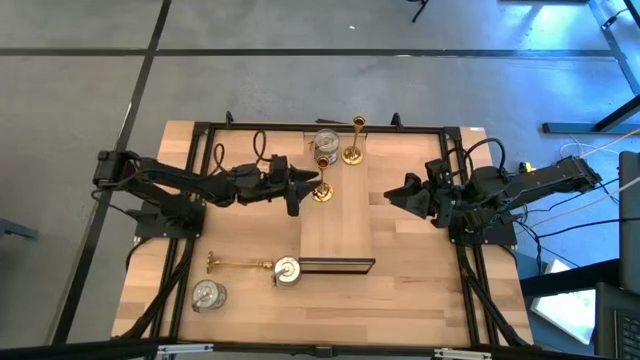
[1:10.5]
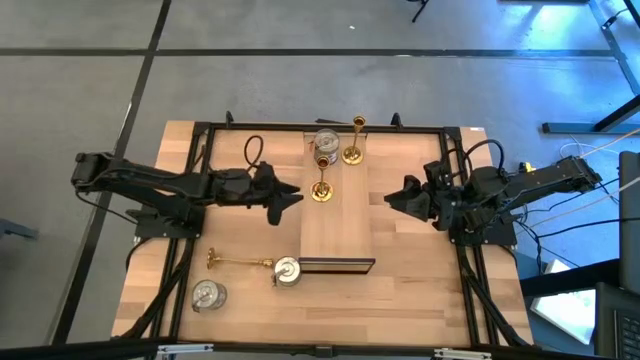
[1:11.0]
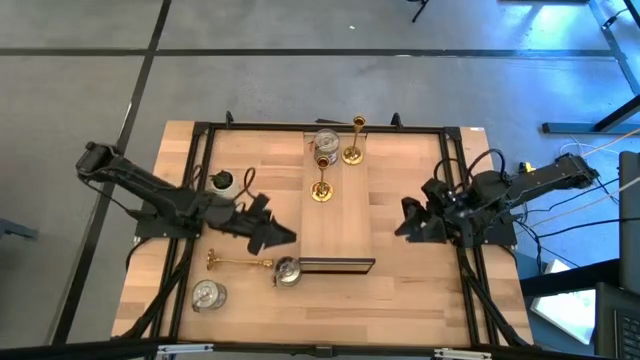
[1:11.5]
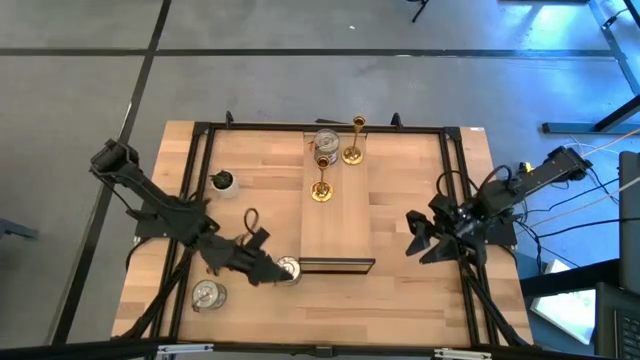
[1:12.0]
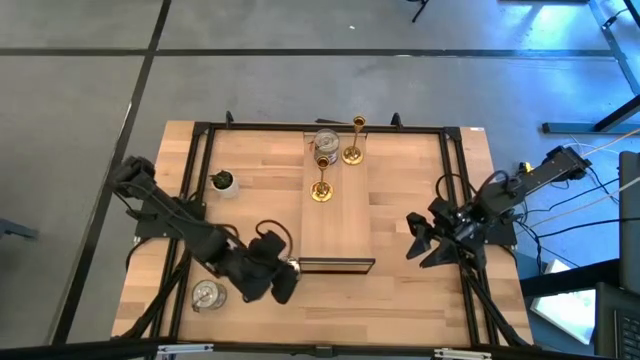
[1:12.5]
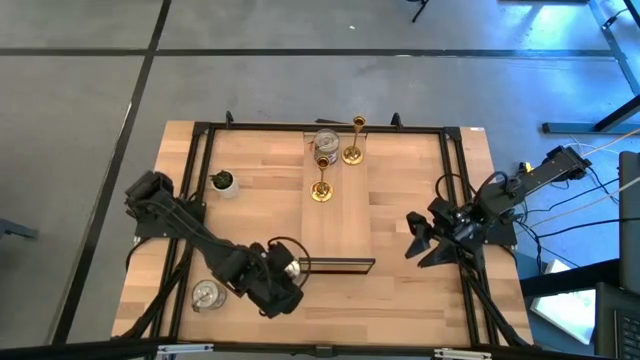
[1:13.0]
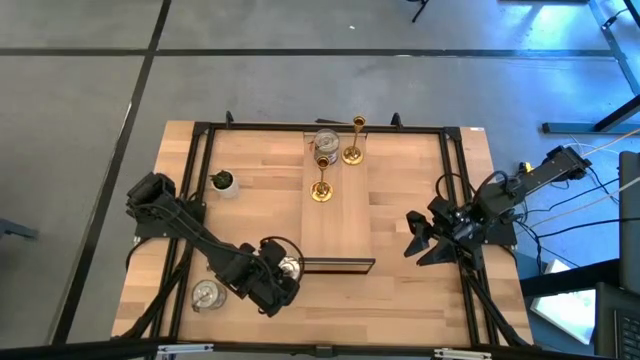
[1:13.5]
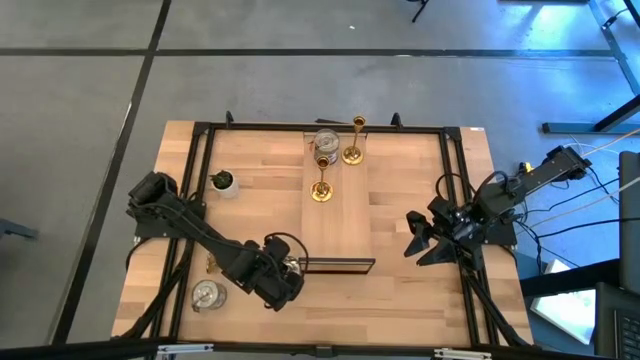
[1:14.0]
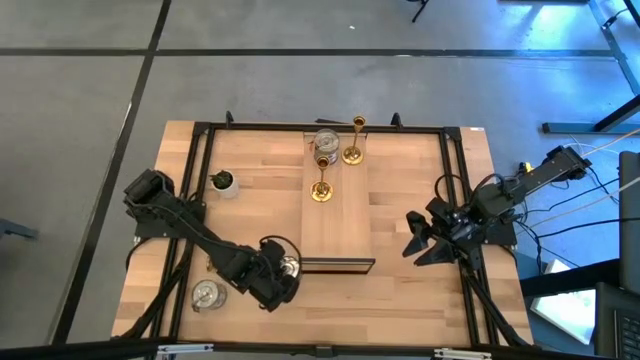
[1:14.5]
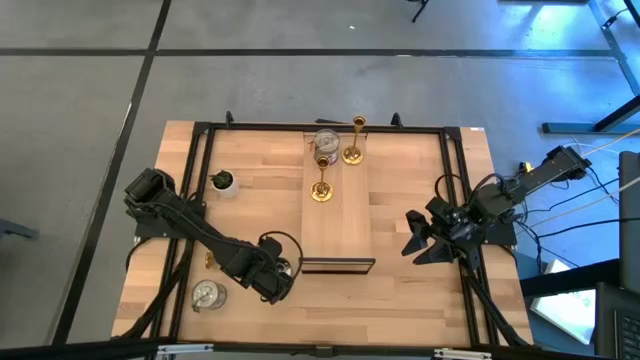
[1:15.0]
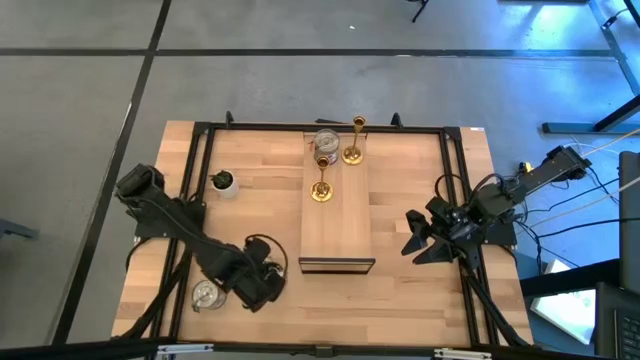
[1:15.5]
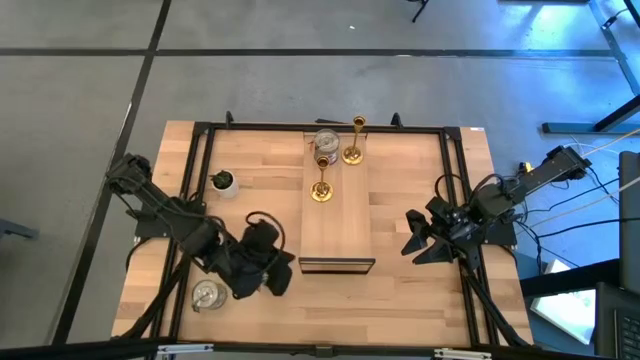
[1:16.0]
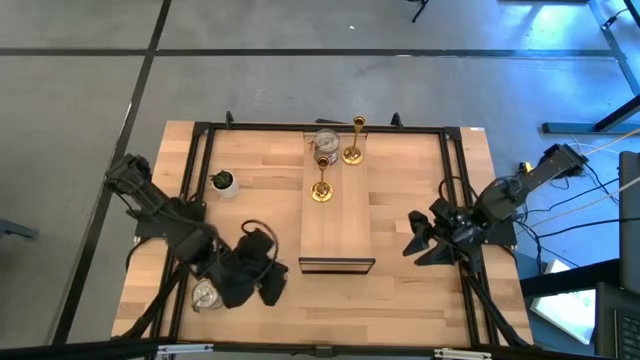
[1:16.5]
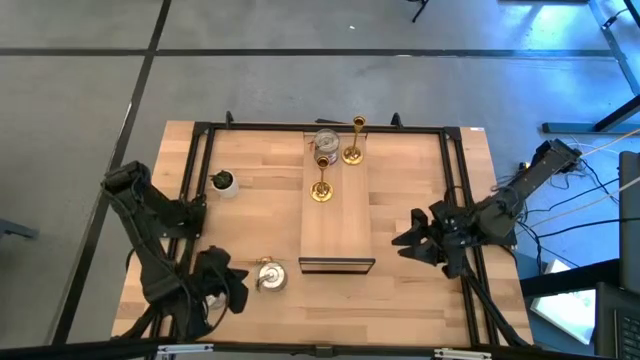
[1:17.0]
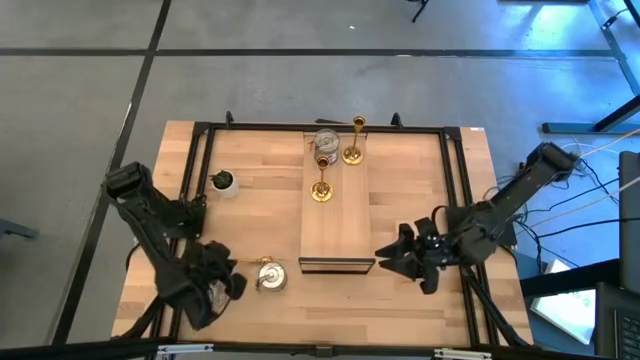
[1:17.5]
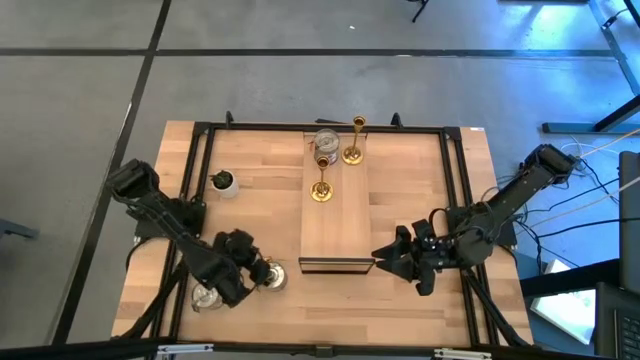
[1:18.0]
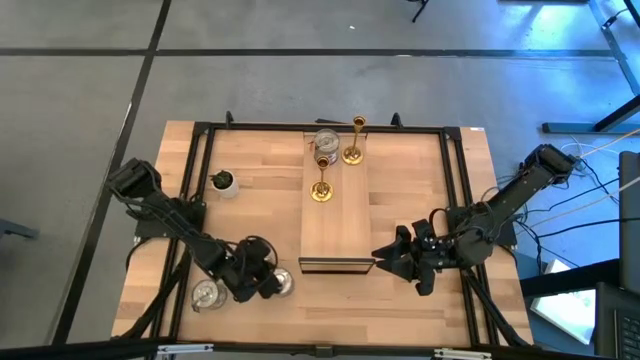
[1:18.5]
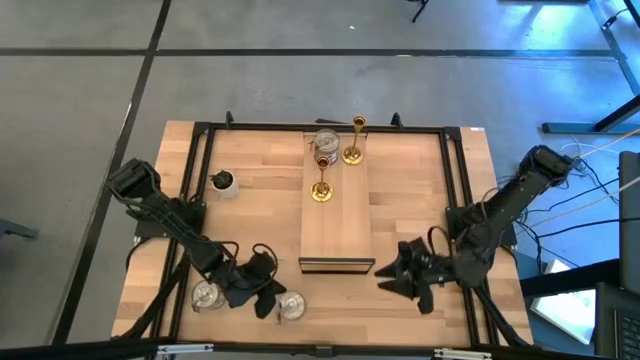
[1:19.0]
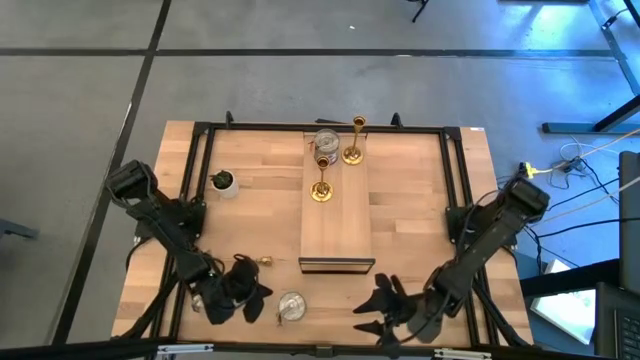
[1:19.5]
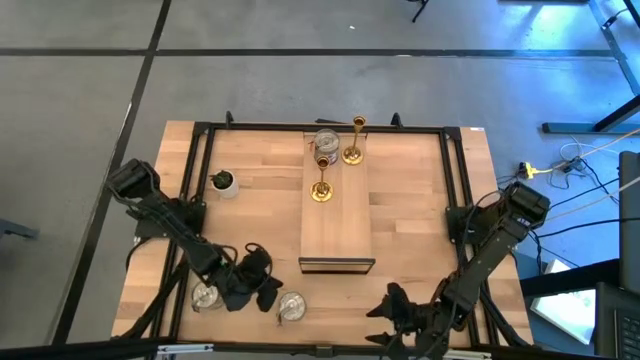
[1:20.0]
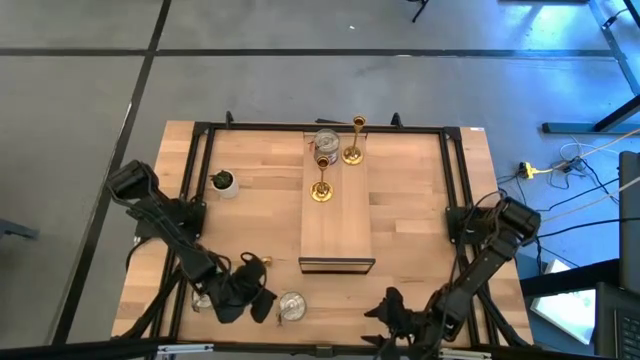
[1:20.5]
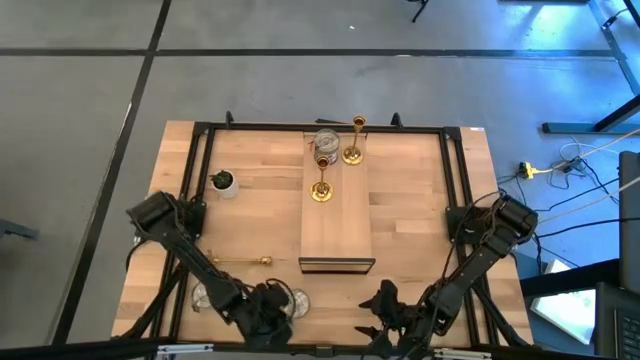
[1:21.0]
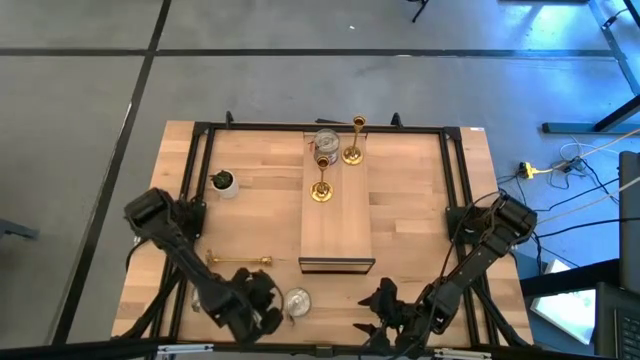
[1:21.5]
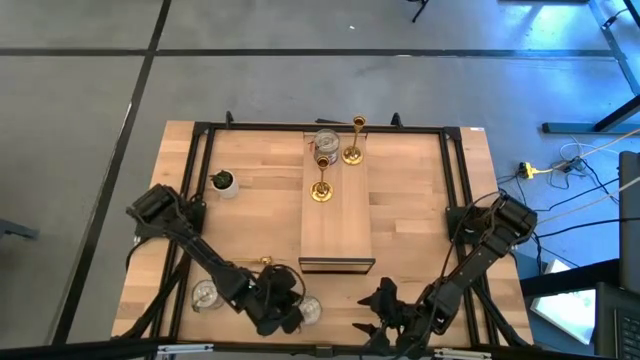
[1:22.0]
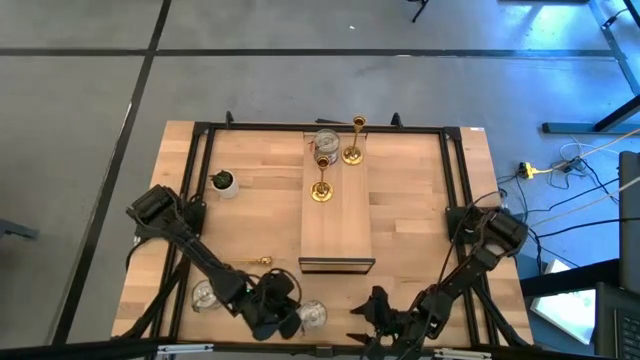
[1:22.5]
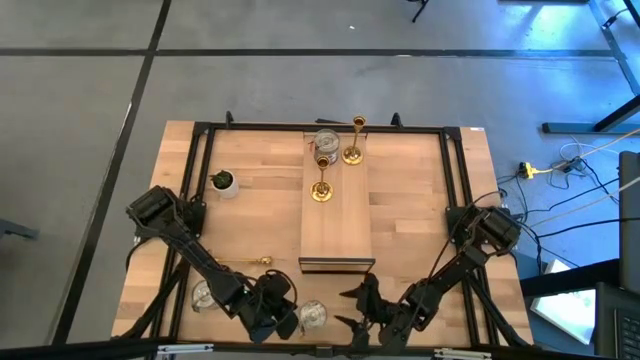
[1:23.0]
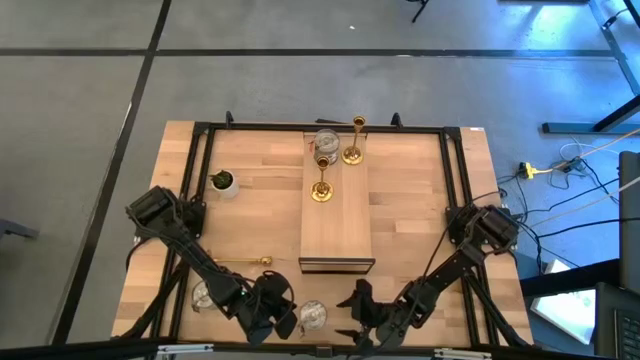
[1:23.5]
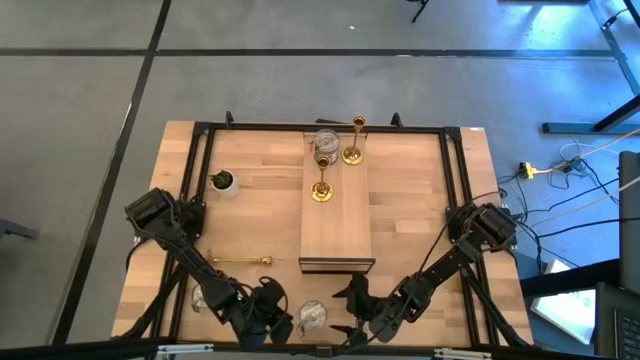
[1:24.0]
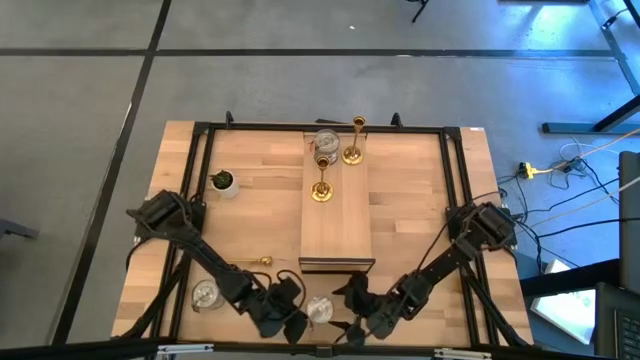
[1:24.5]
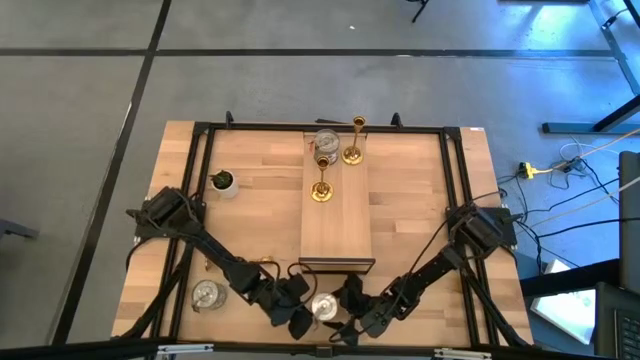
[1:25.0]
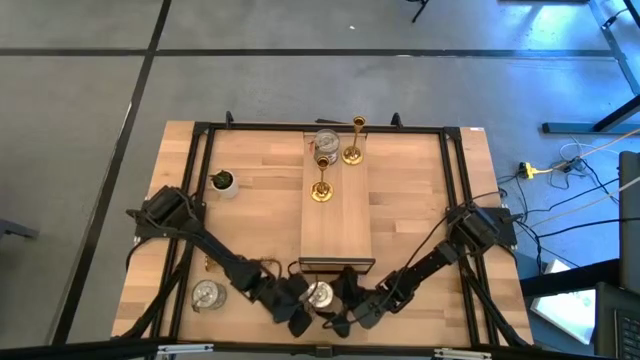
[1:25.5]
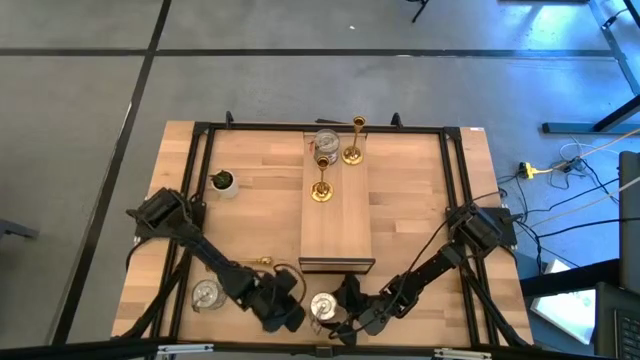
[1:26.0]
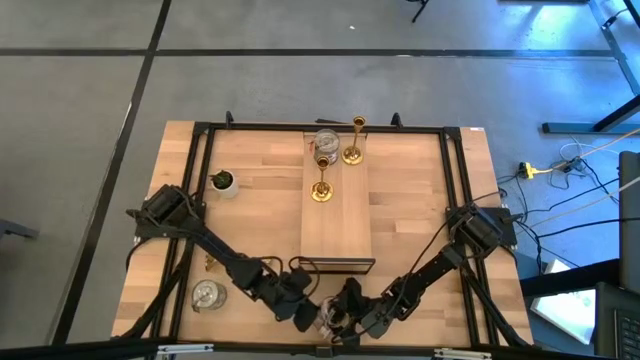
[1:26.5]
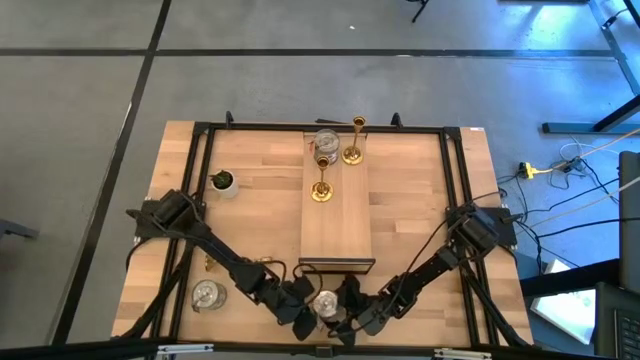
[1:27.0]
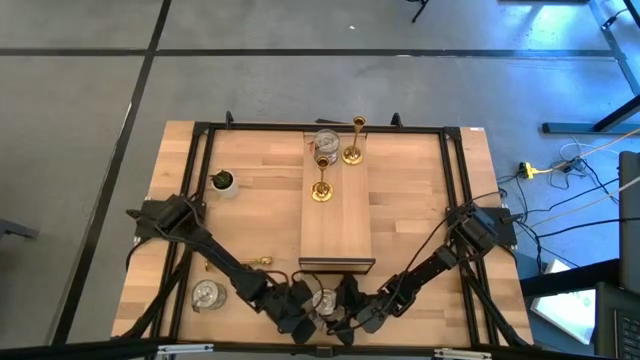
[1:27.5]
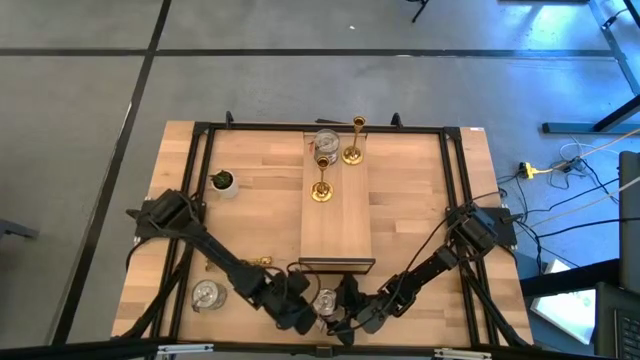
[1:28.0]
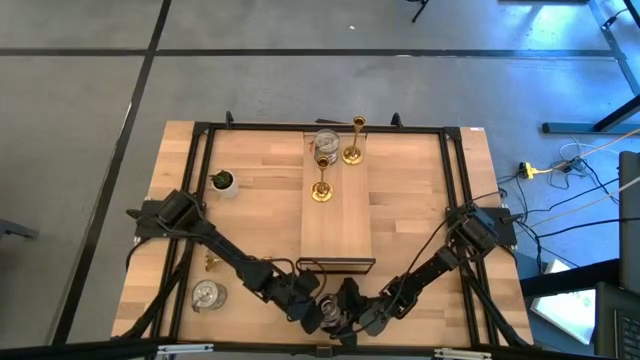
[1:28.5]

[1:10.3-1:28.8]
Task: Pick & Place candle stick holders
Put the right scented candle on the shelf

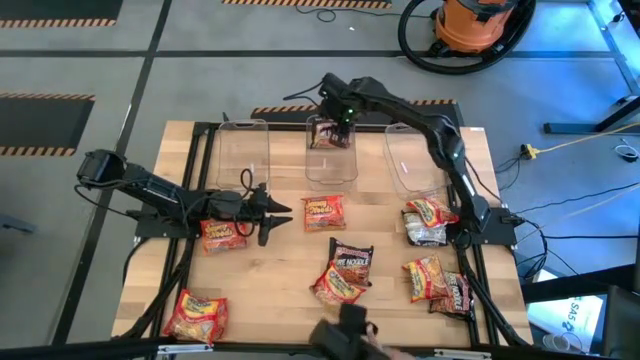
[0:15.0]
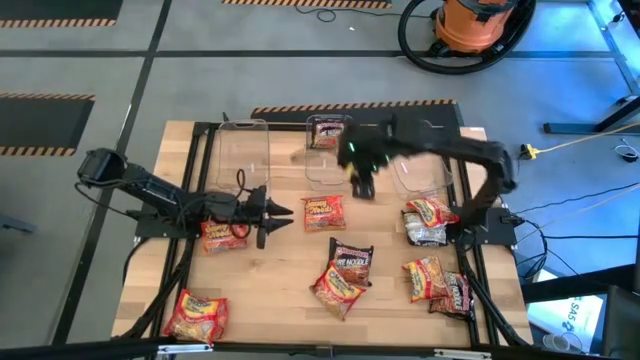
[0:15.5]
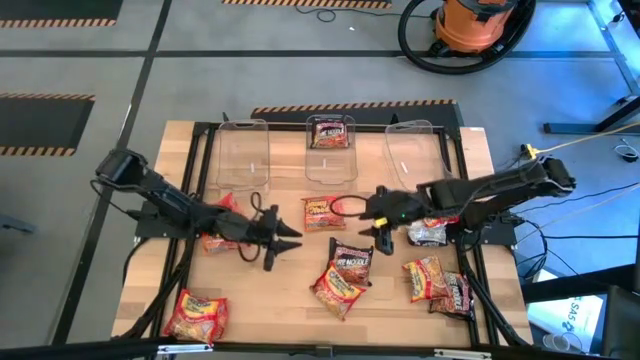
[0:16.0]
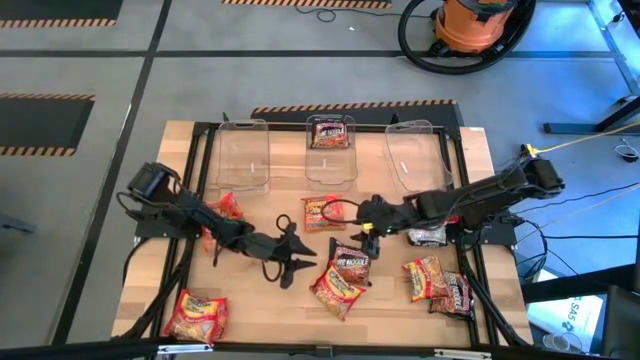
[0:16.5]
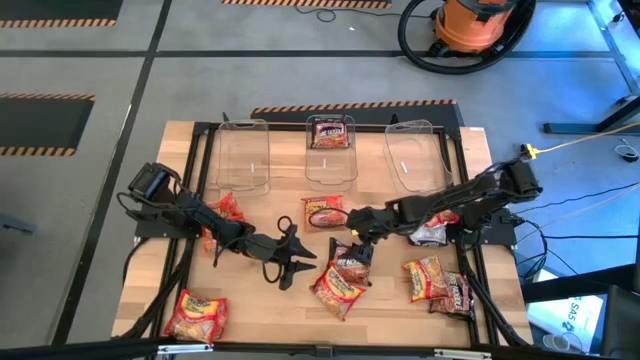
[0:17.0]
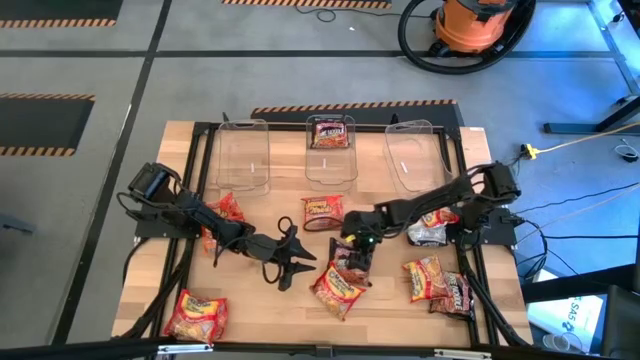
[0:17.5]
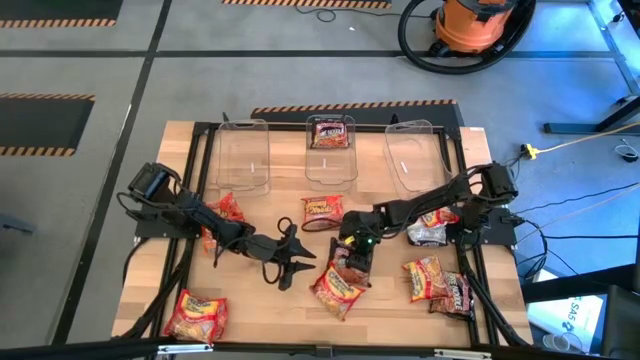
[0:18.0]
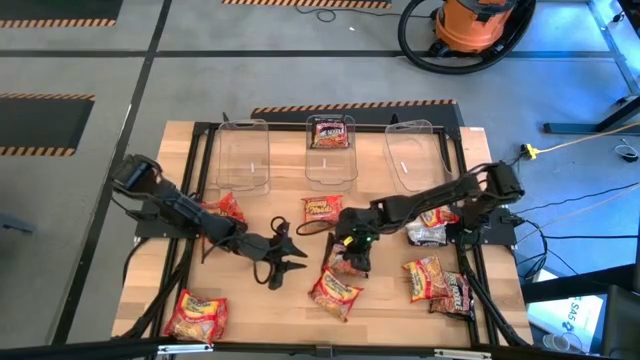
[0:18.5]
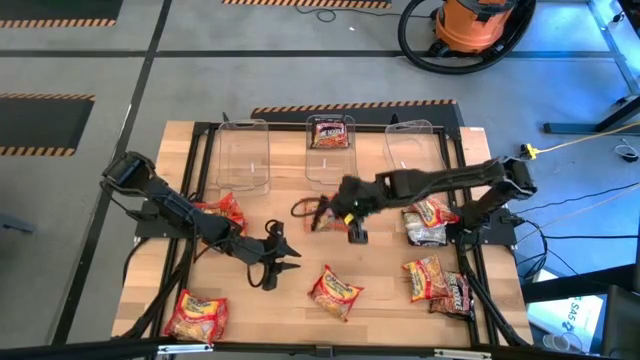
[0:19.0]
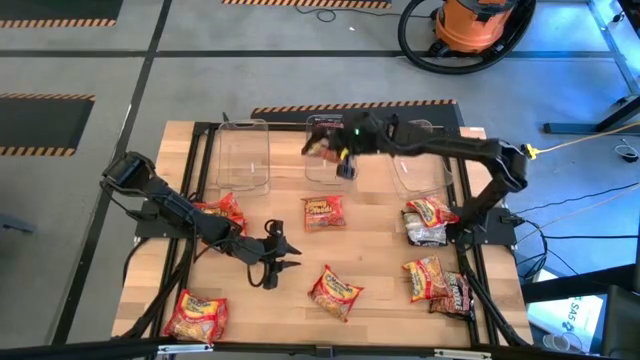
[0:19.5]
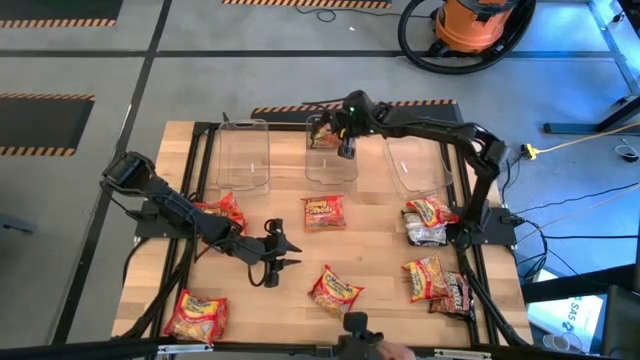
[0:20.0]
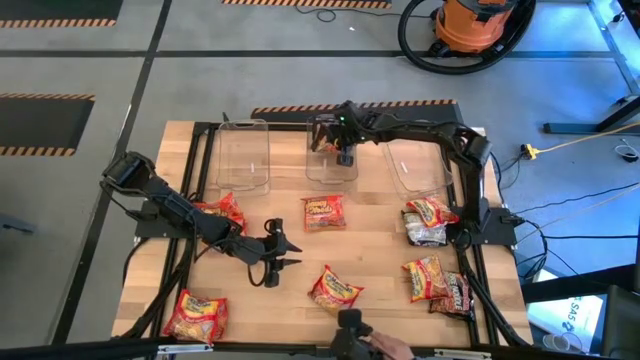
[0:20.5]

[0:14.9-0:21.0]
Task: Sort Maruchan noodles
Put the bottom left black noodle pack into the middle transparent bin
